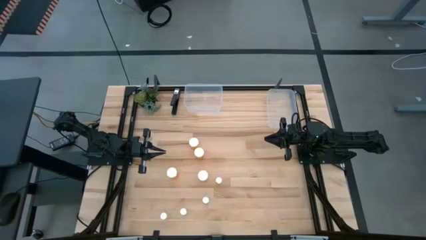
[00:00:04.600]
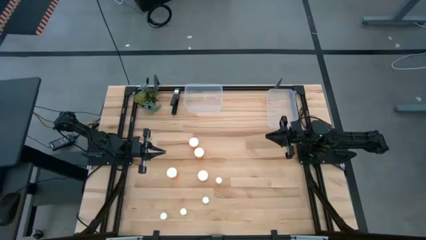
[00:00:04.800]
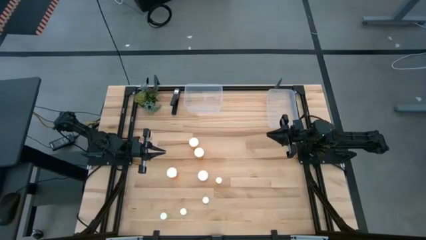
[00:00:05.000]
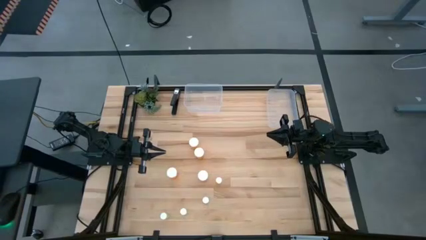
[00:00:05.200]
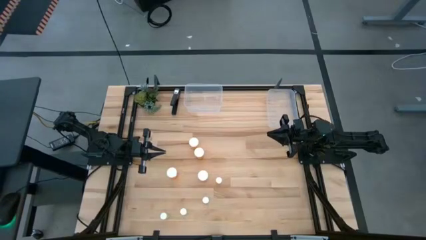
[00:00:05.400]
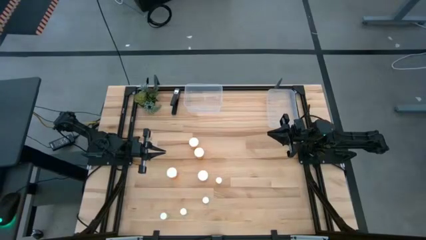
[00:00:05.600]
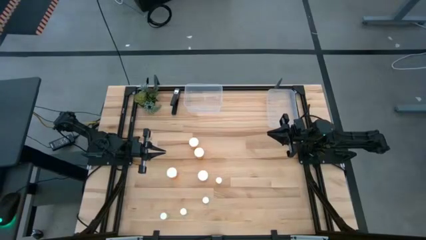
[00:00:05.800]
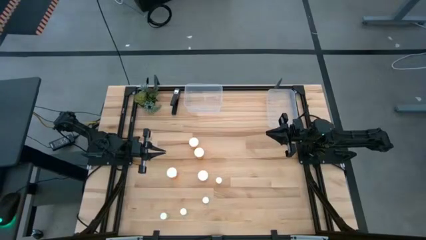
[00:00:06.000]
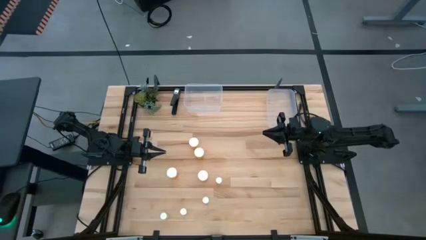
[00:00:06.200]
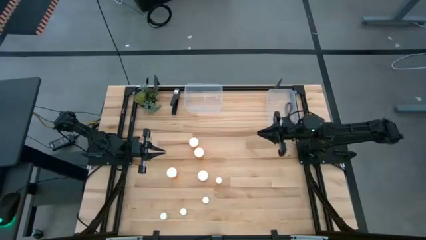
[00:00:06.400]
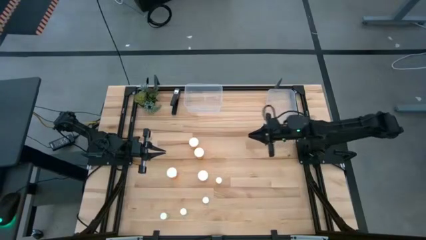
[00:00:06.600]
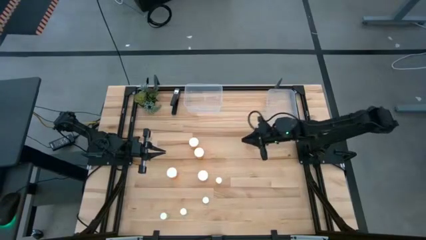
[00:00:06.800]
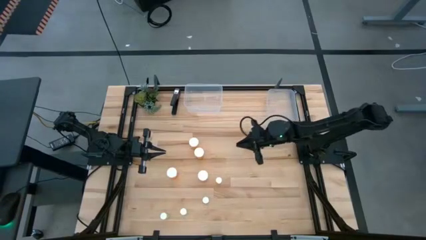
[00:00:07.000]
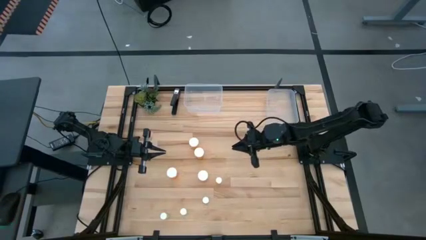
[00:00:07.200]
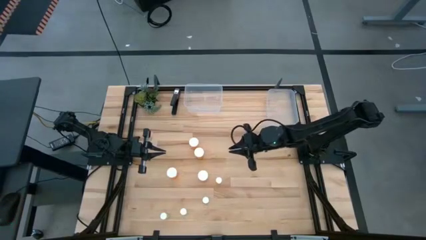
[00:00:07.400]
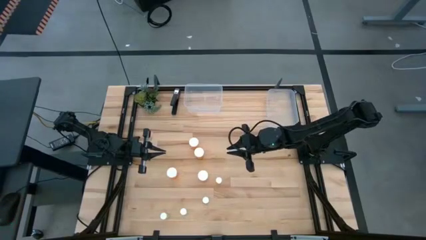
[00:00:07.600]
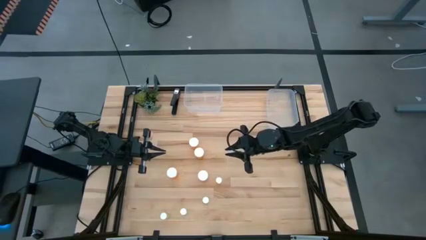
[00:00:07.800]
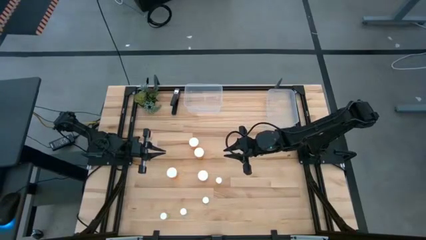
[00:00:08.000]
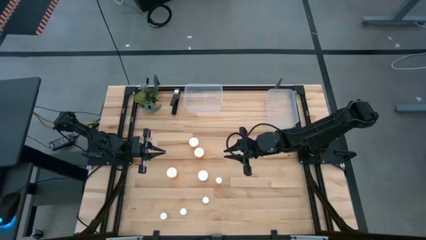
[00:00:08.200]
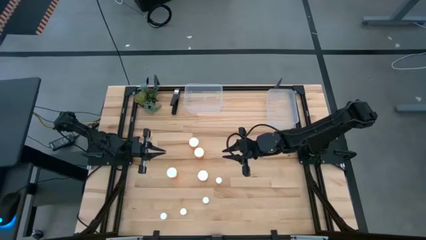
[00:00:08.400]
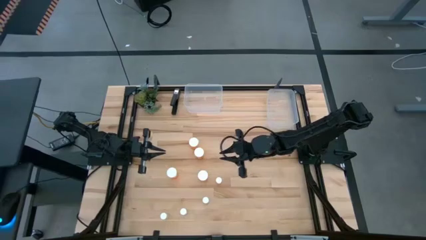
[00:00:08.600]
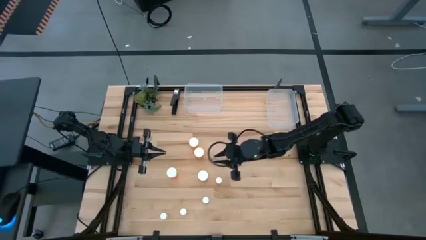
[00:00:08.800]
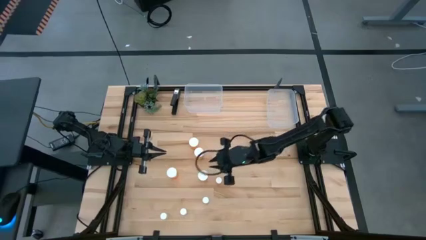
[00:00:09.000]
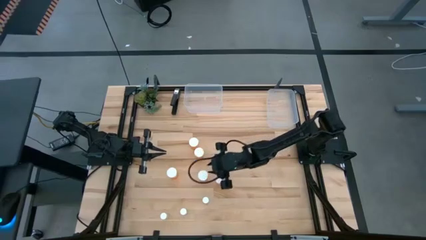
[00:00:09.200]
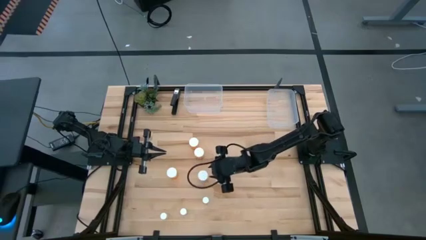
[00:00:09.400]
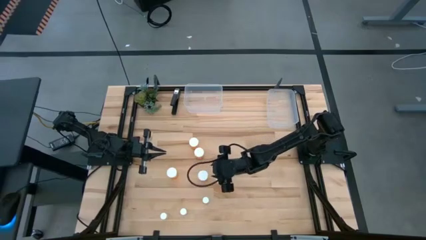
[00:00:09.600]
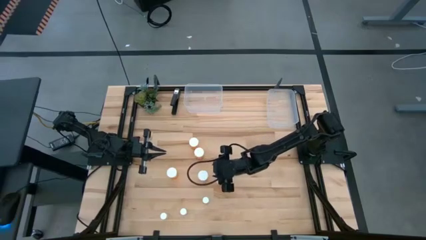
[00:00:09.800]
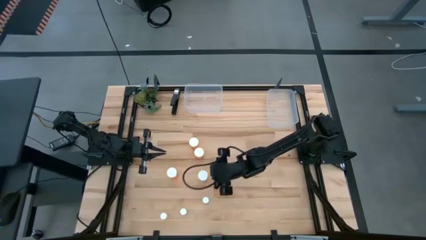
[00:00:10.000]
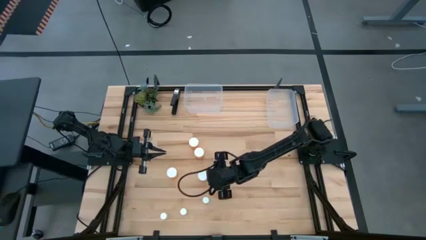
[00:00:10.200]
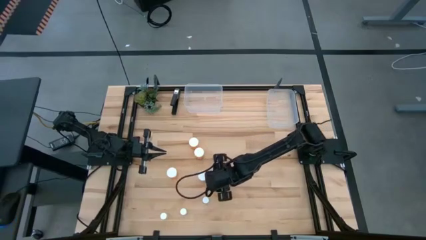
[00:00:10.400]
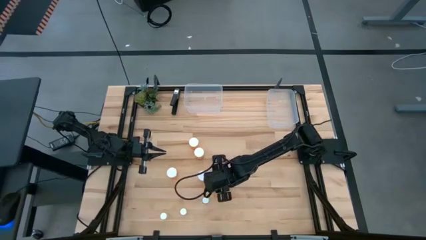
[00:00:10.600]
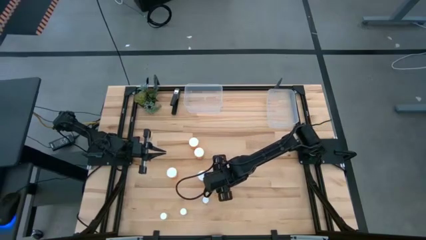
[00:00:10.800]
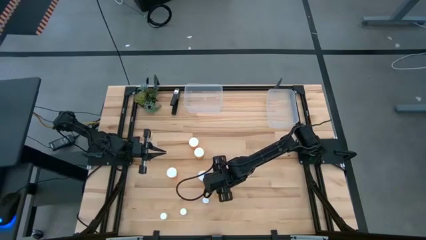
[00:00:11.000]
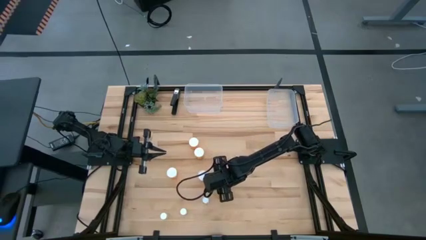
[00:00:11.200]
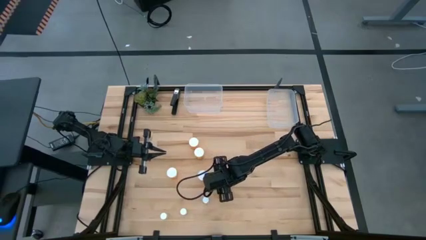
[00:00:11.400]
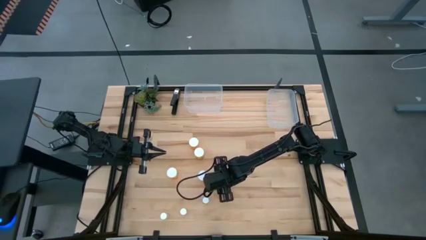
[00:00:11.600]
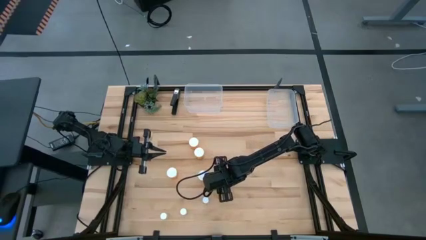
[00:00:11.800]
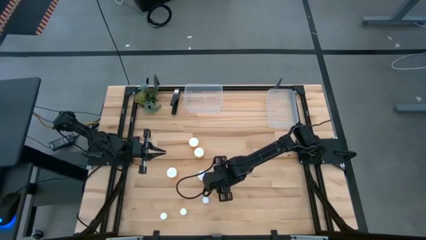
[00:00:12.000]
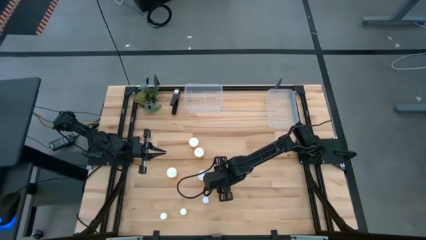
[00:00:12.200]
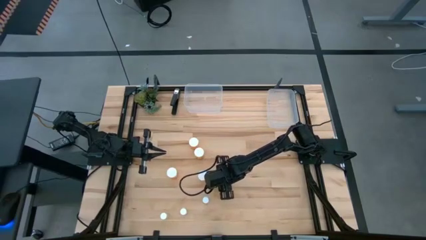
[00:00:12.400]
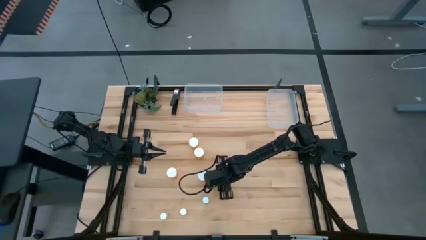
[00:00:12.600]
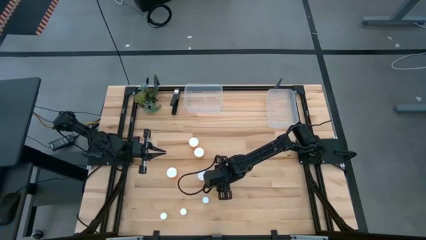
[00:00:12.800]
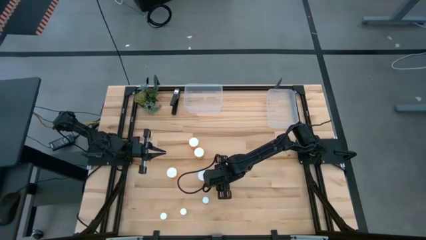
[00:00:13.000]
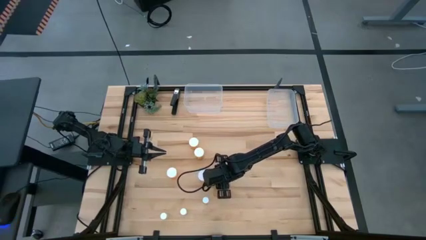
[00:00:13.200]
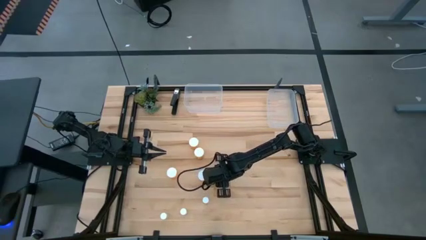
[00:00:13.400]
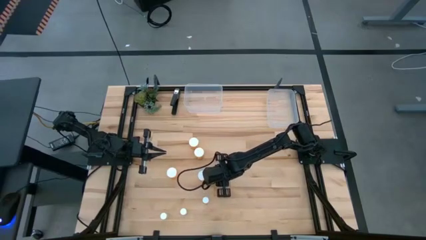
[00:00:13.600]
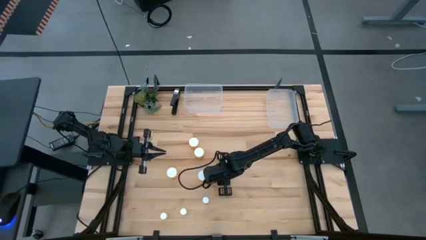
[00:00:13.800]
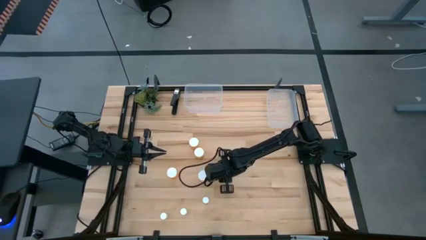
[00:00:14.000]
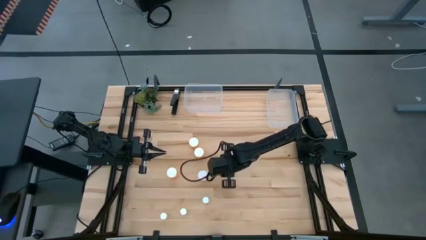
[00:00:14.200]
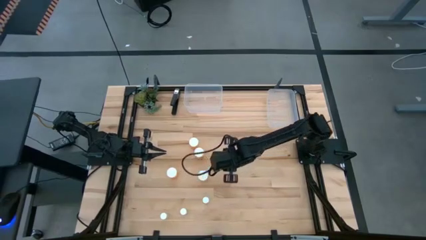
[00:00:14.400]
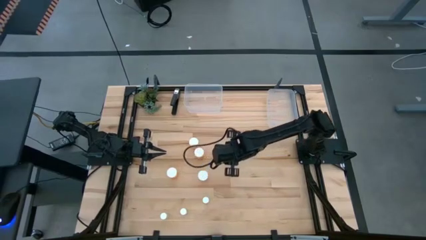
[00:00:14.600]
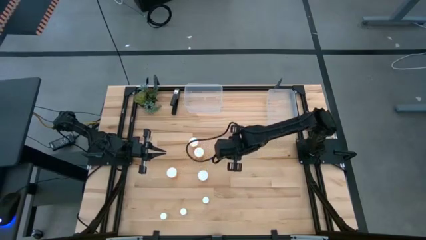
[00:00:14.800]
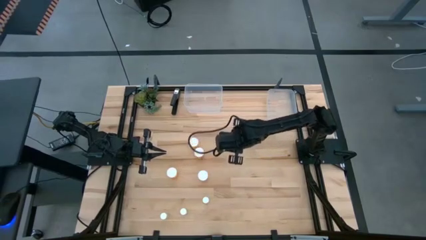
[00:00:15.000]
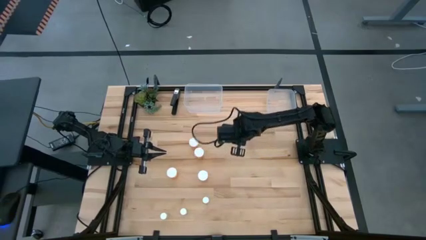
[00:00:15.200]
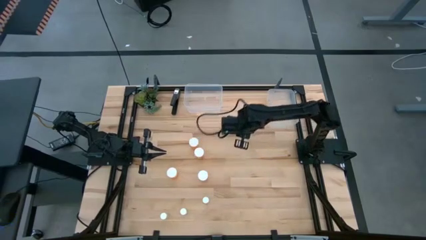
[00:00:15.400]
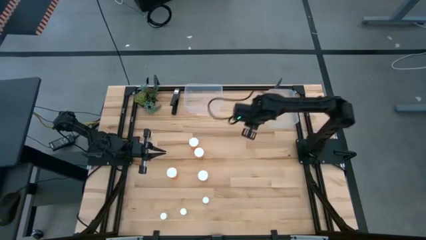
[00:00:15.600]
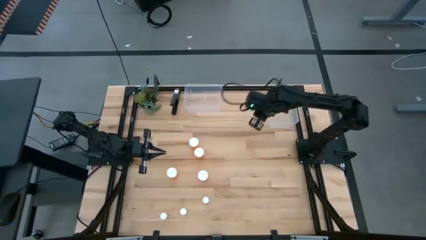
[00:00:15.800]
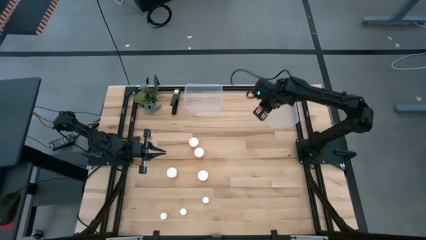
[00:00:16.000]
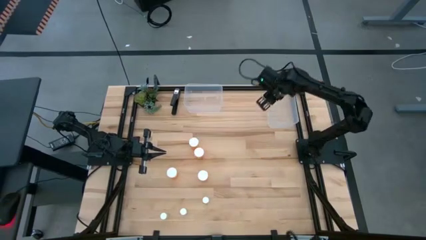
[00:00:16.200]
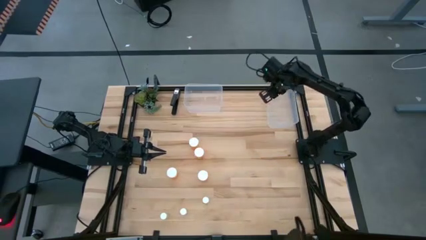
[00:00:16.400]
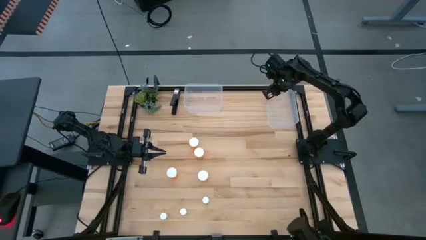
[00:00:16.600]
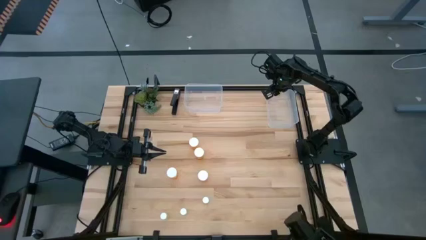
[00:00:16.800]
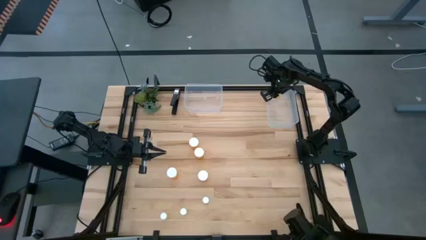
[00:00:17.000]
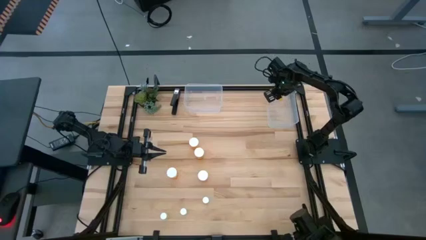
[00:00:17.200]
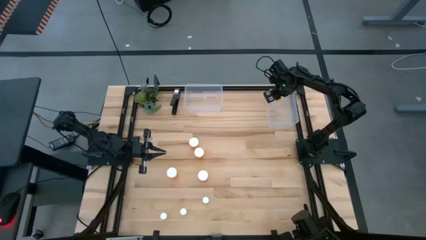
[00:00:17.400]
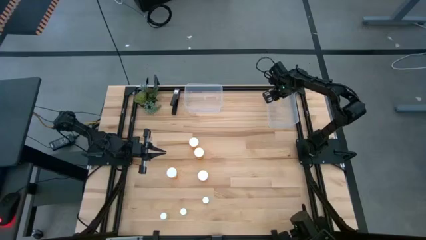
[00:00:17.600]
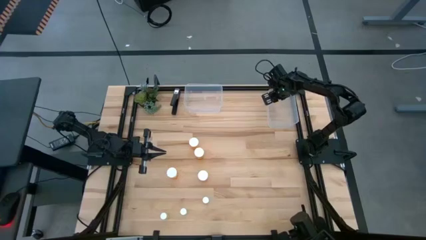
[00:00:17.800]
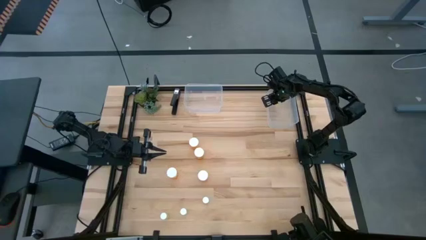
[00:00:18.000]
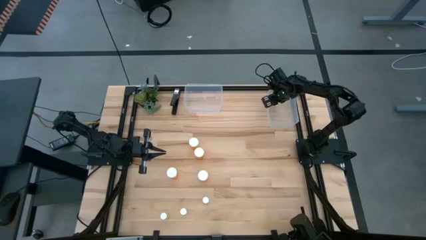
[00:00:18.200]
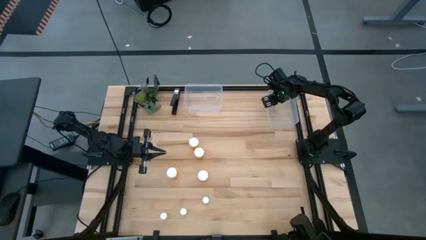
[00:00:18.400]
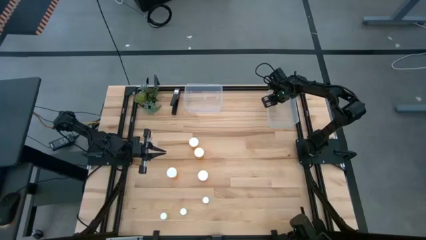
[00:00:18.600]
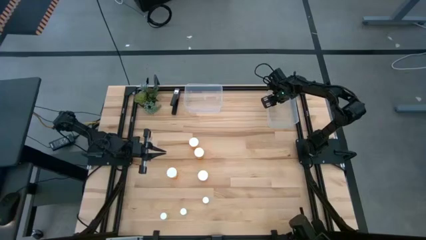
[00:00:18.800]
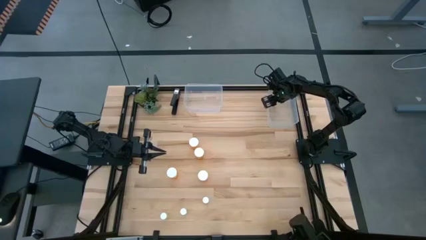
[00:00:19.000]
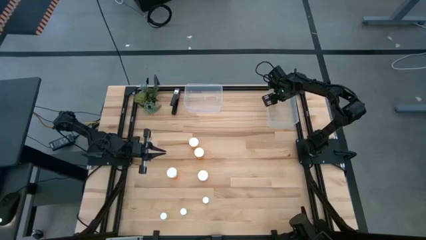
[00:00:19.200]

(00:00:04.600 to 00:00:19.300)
Task: Pick and place medicine bottles into bin by pill shape (circle, oval)
Put the top small orange pill bottle into the right transparent bin
